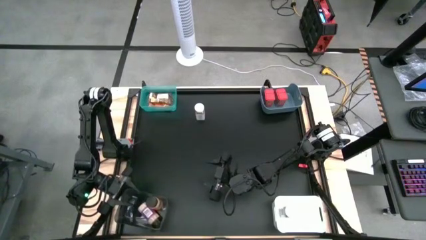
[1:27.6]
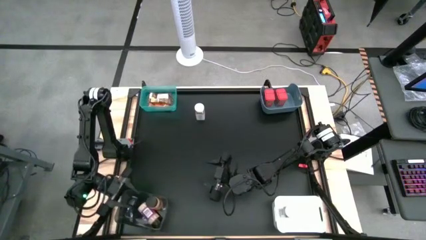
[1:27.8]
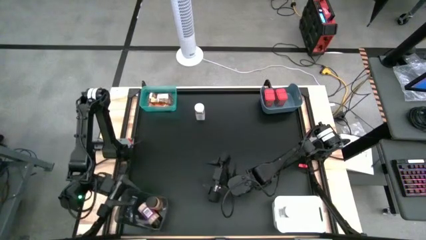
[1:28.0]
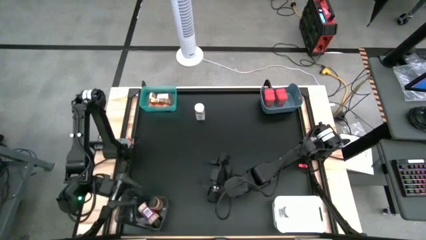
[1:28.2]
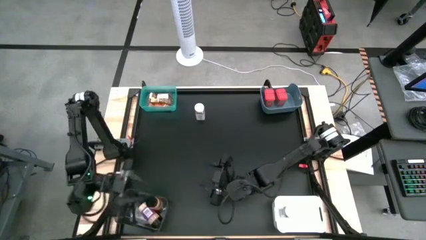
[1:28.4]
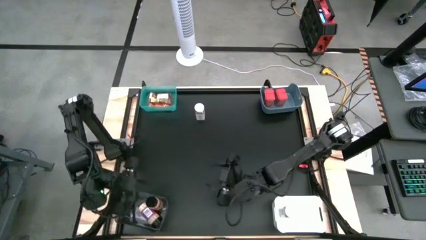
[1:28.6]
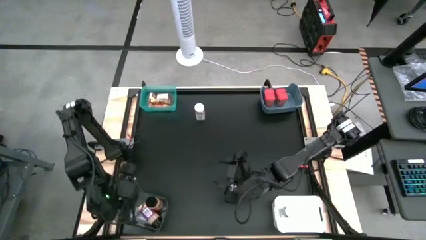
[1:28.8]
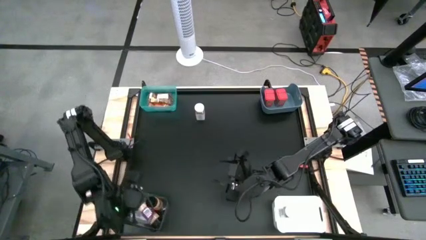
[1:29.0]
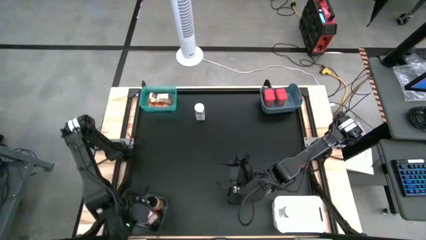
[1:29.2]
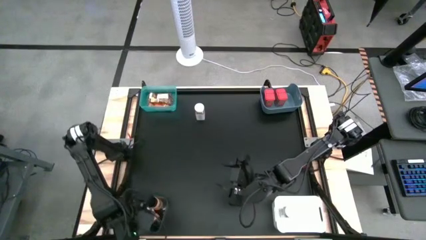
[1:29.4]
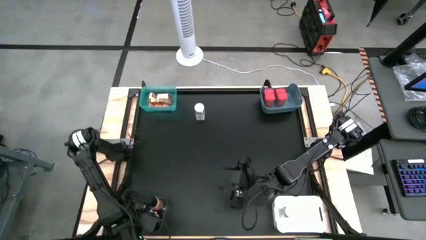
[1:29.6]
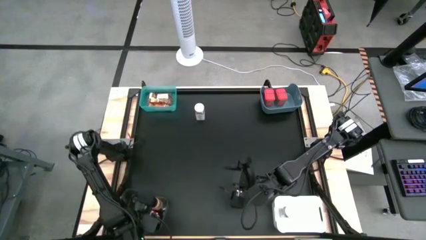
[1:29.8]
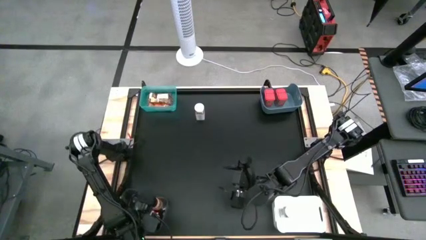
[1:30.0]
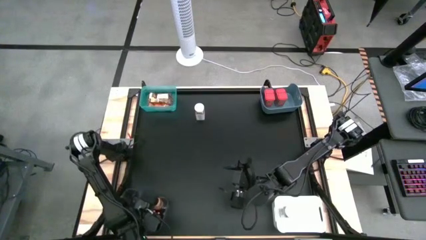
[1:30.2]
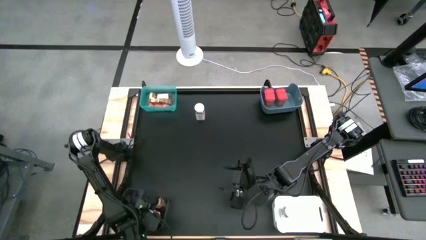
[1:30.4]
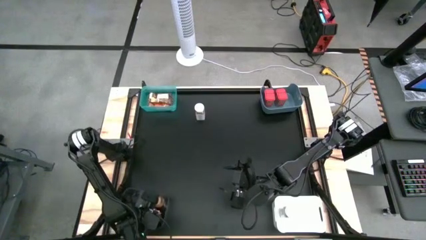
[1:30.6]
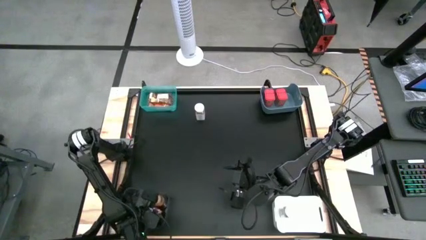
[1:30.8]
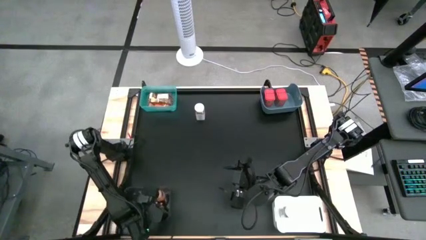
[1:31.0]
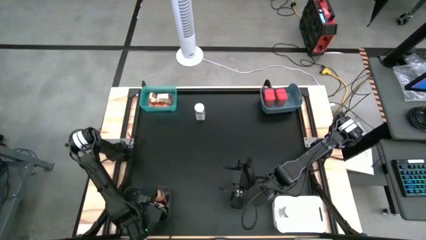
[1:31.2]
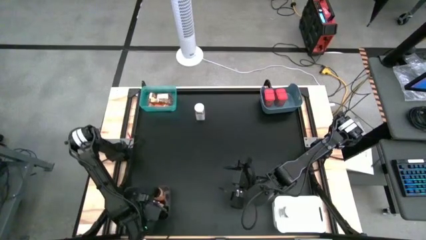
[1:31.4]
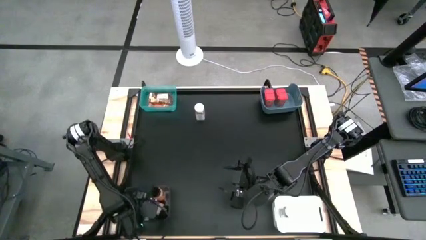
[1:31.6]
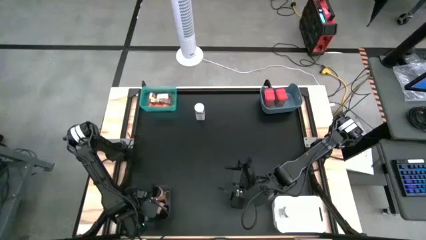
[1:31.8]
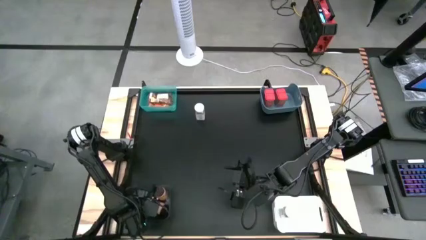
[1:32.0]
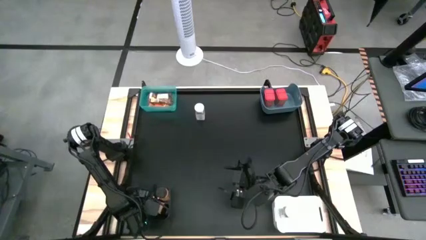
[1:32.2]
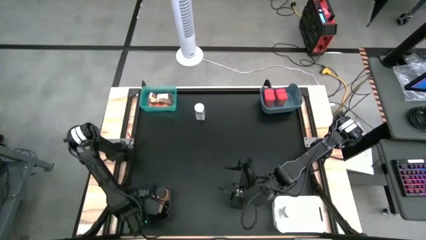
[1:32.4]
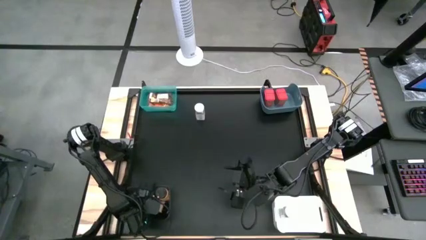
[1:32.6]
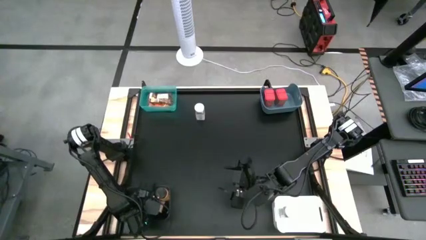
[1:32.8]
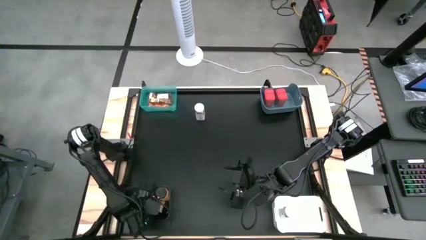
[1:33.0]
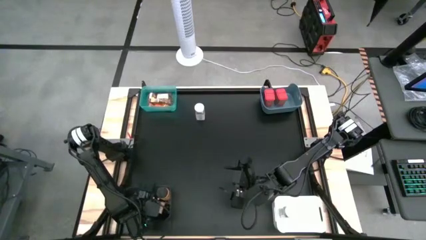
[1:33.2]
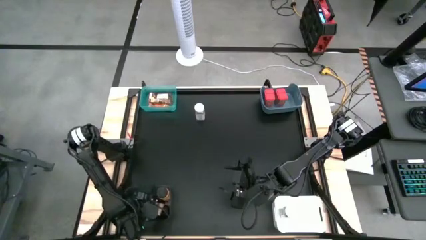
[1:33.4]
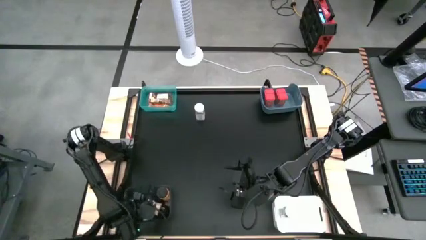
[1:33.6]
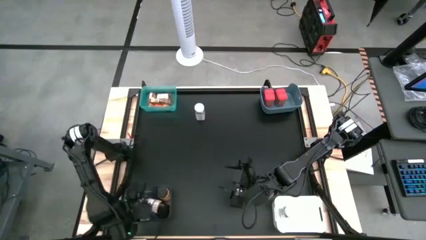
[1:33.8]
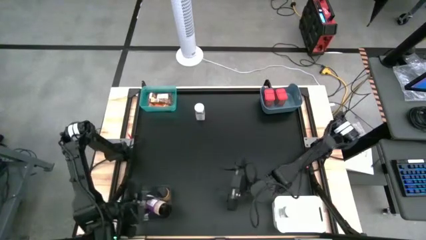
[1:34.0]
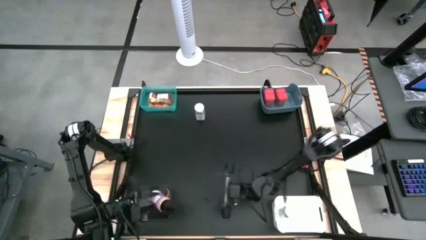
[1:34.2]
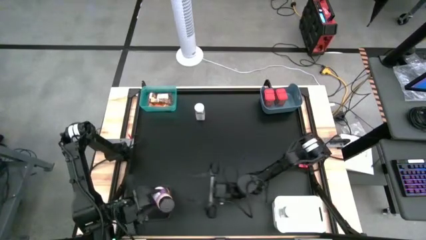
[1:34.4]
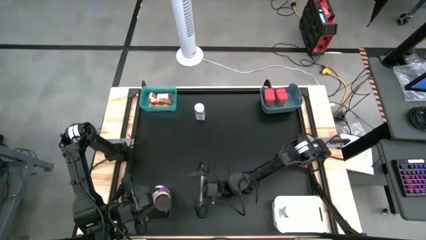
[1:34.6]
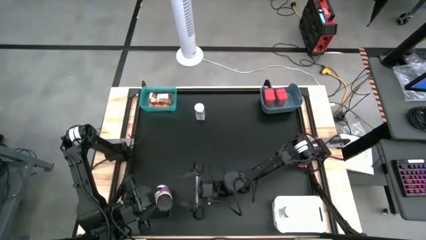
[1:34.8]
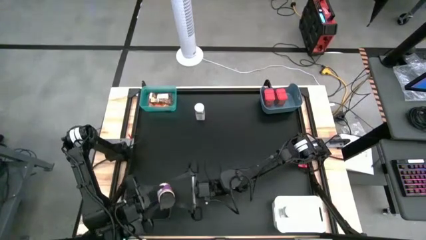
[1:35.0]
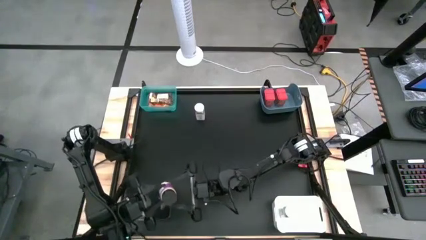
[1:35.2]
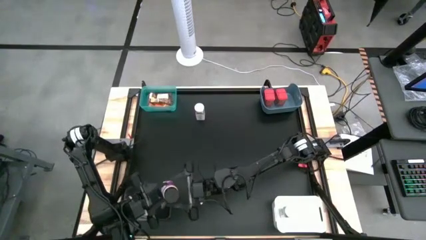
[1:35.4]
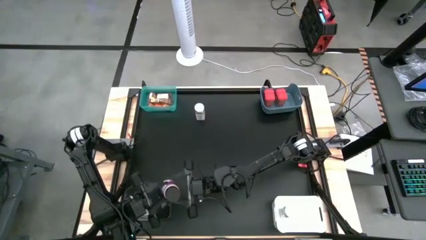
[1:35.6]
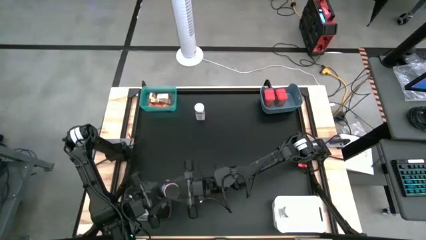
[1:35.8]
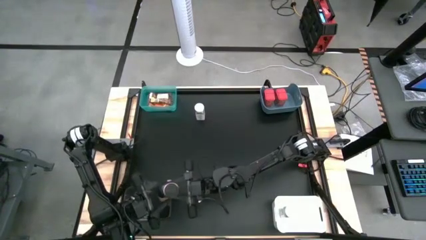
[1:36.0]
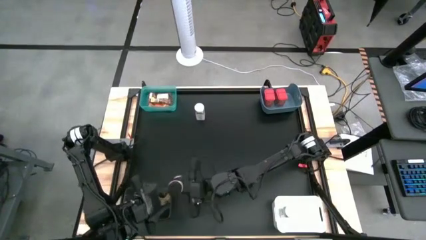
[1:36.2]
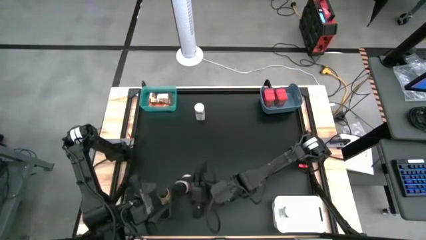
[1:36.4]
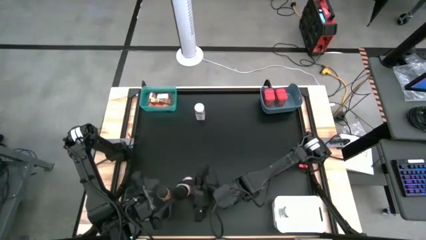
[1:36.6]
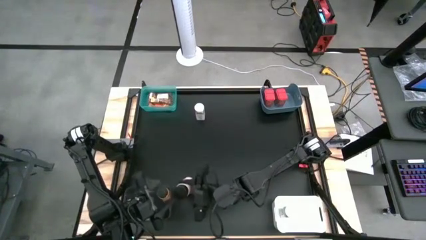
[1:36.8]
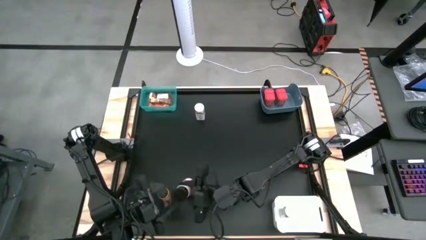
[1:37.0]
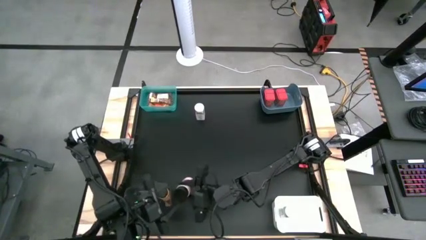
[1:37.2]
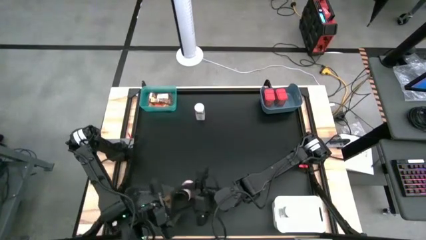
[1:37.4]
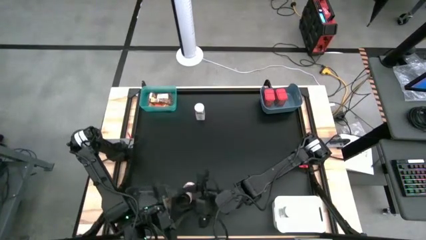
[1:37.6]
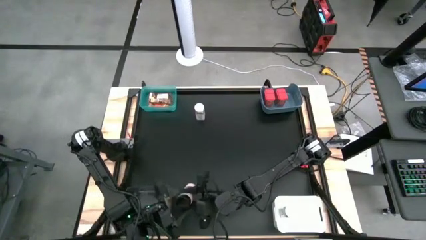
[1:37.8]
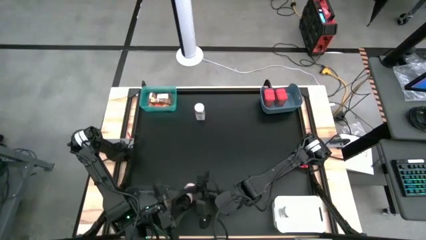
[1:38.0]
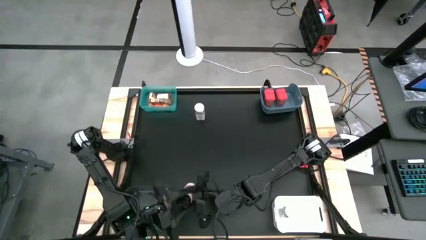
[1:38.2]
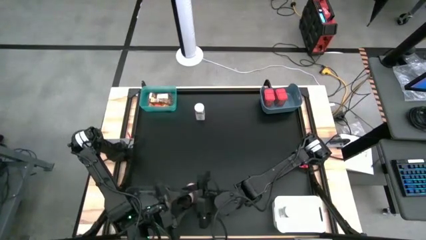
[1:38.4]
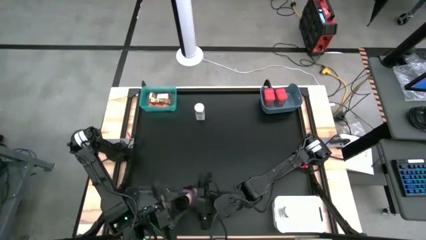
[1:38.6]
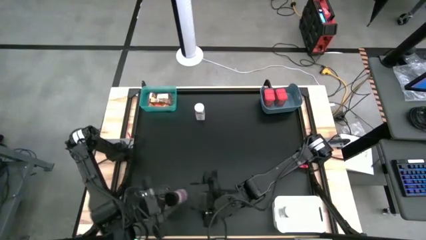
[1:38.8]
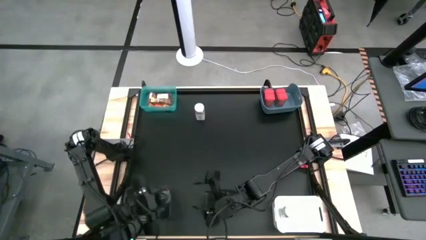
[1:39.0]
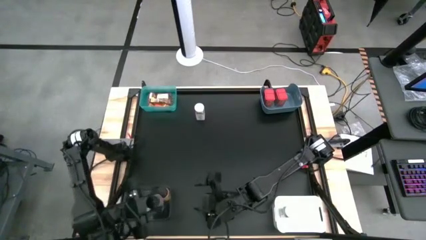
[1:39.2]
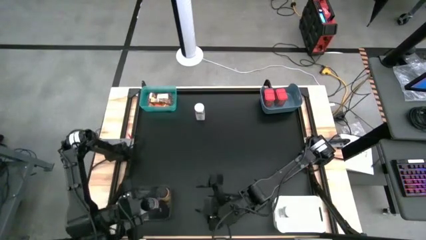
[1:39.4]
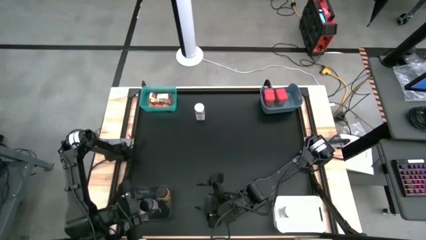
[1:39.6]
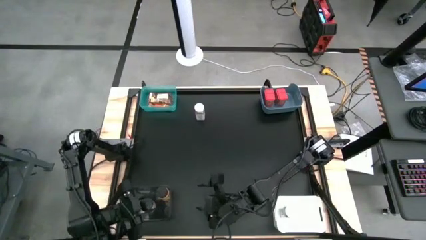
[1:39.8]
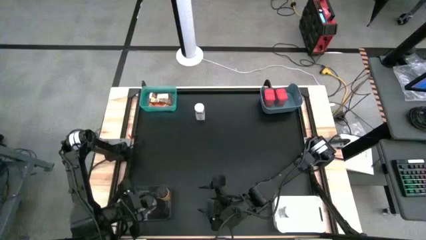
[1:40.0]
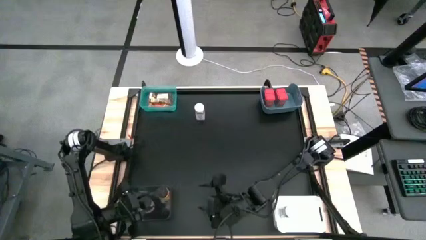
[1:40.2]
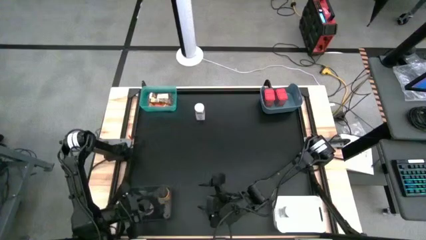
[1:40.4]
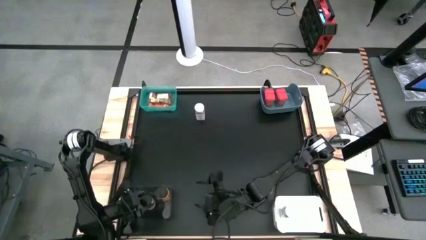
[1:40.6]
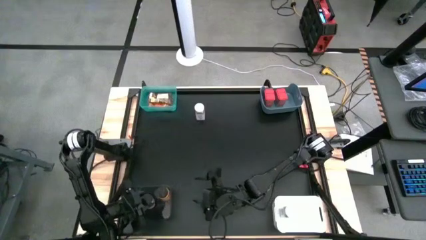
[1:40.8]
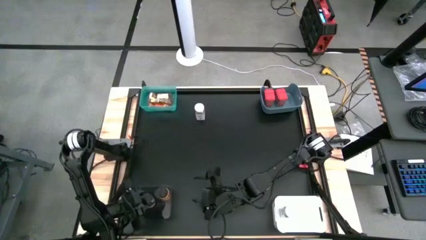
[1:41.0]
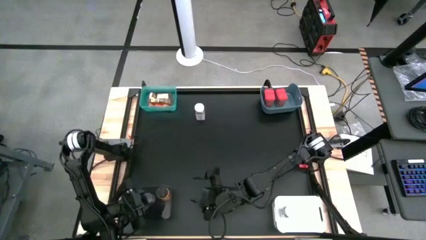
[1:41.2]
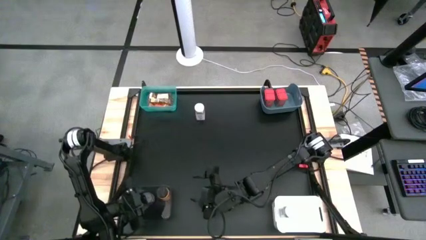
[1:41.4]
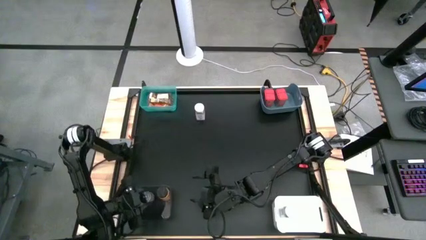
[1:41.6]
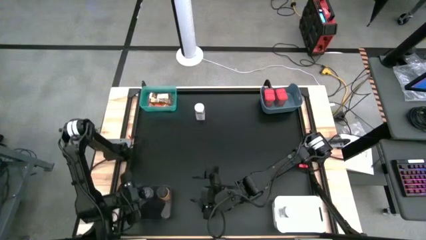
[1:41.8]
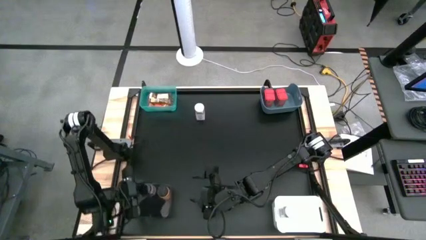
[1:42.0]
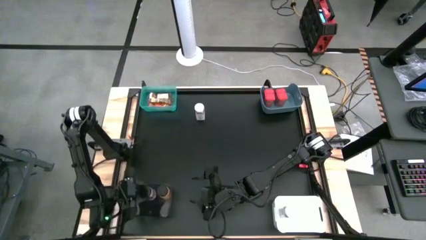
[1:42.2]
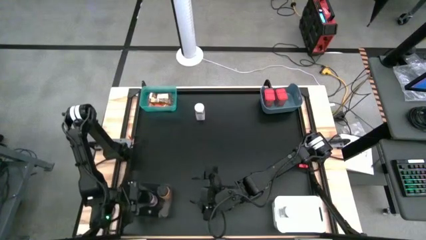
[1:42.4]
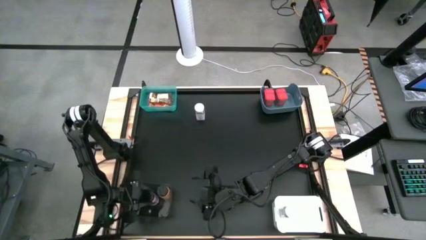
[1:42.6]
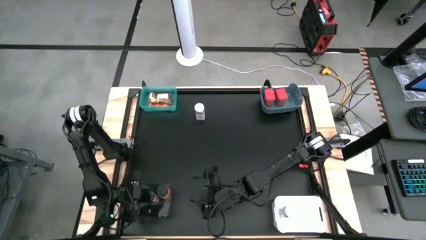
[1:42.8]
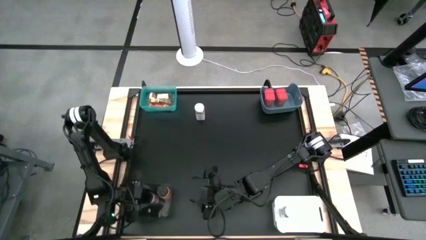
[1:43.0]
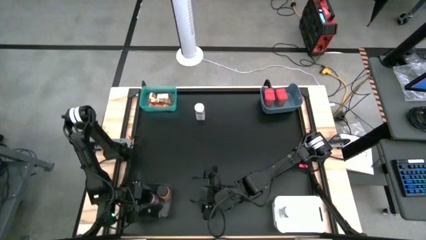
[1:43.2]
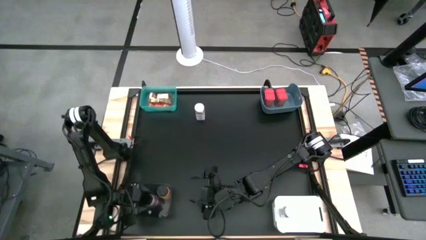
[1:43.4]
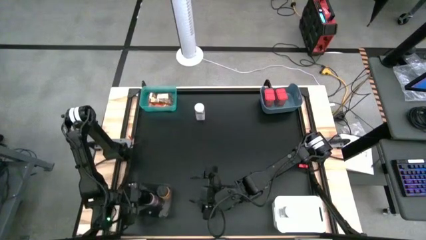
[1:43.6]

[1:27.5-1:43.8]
Task: Sort spices by type
Put the black seasoning bottle into the black bin
